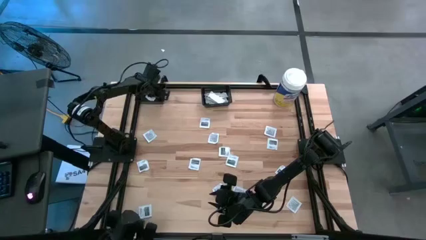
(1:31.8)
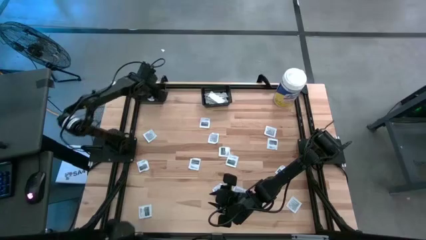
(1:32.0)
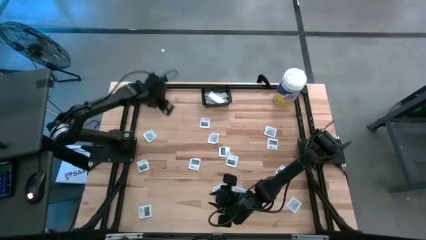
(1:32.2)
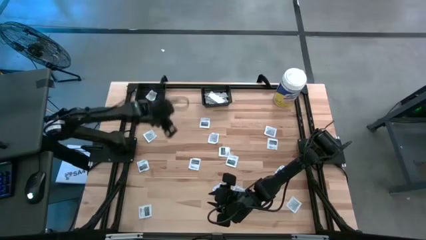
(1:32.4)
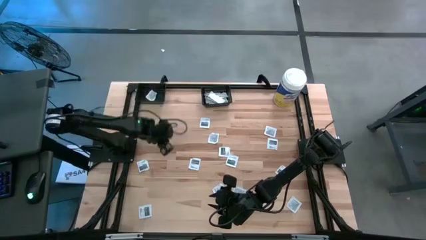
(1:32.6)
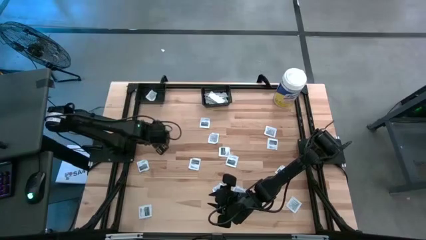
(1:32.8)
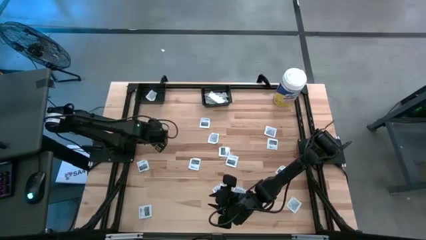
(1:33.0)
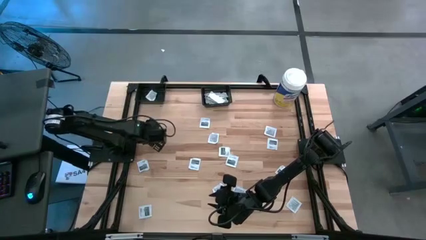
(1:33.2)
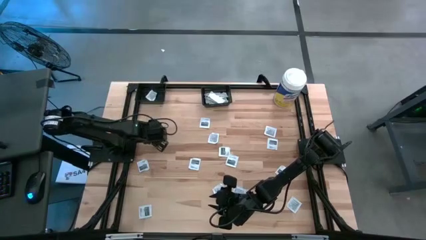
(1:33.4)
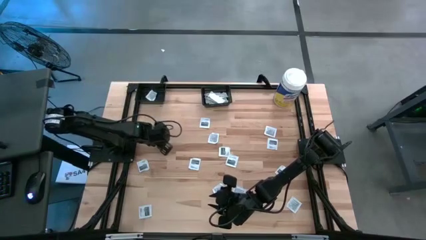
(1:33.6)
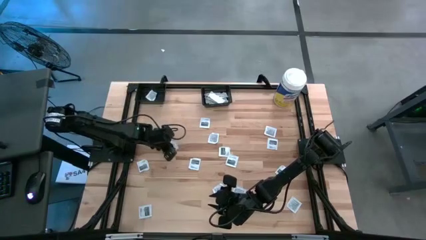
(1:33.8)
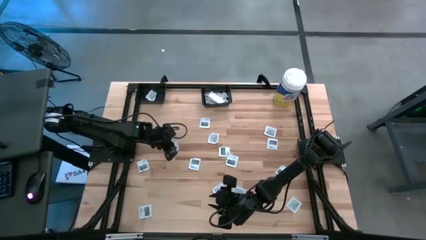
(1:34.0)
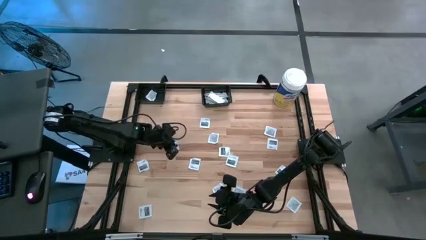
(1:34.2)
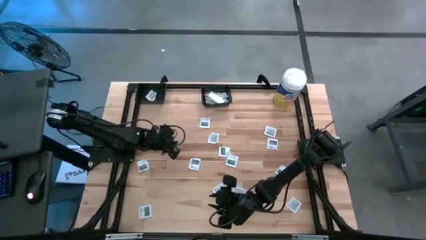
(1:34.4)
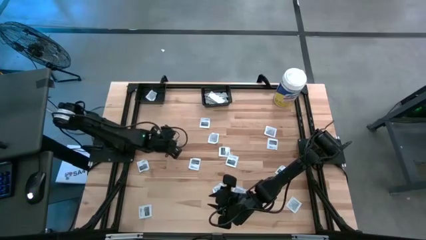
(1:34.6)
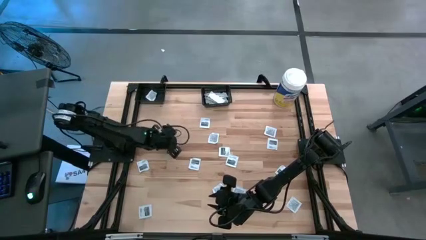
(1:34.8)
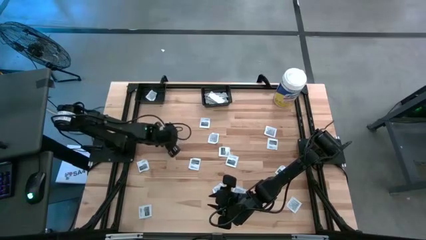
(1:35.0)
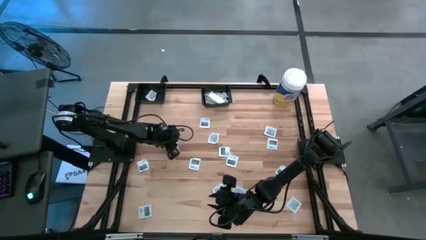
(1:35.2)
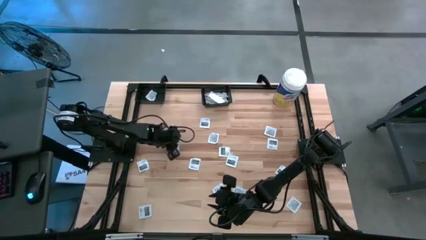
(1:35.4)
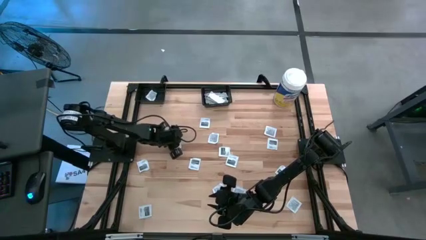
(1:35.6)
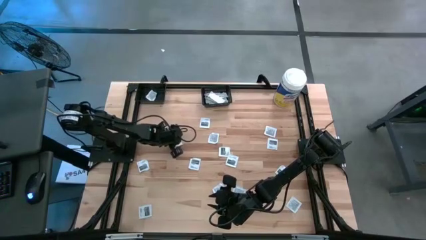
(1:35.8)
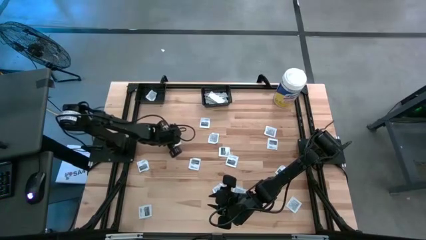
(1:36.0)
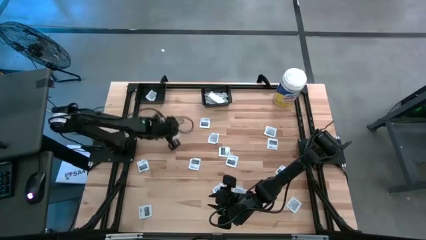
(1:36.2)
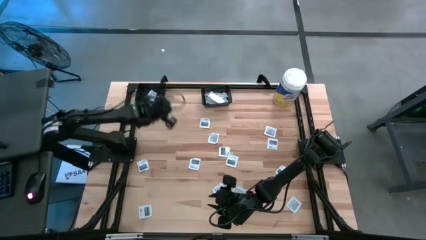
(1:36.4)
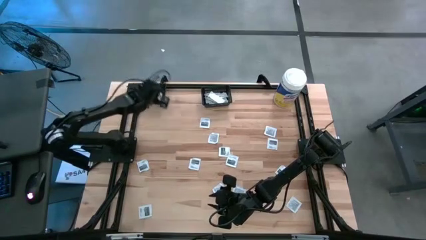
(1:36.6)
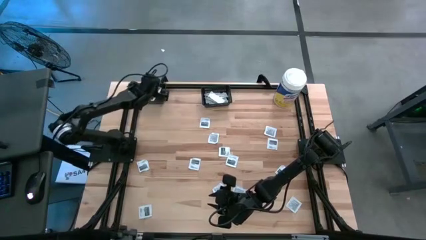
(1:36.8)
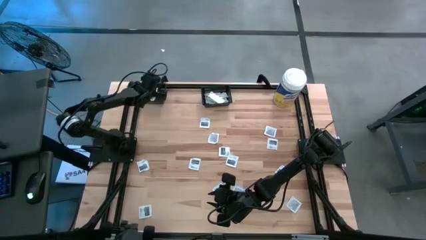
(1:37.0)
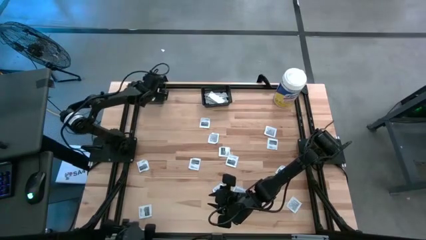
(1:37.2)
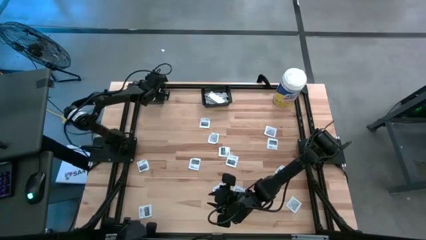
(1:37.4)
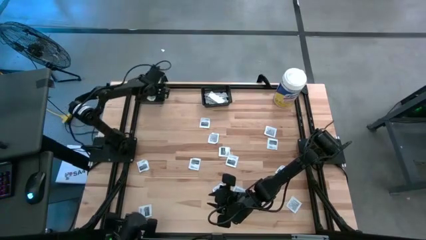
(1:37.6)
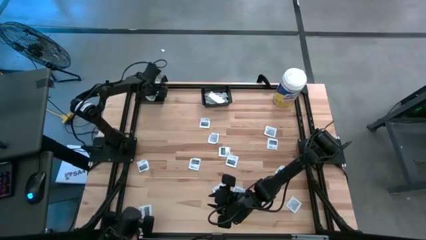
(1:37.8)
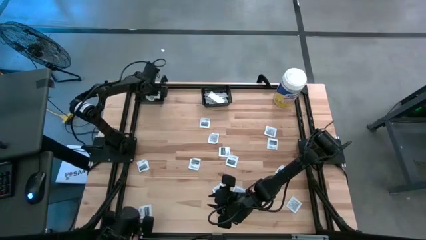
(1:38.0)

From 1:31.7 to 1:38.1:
Task: Pick & Place First Aid Supplies
Put the gray towelette pack into the left black bin

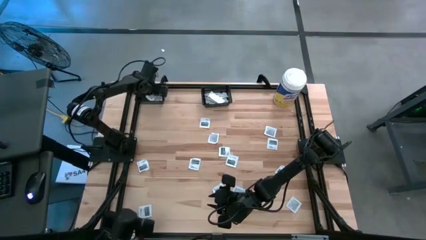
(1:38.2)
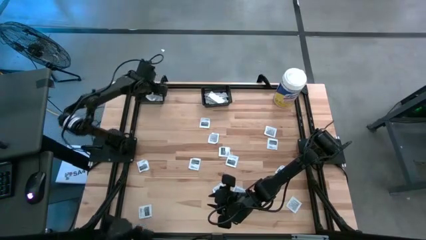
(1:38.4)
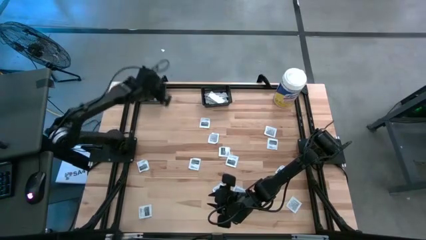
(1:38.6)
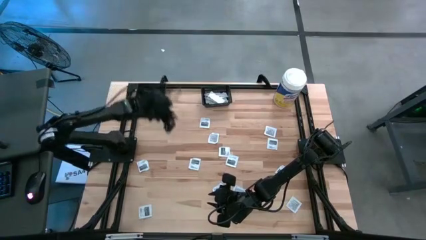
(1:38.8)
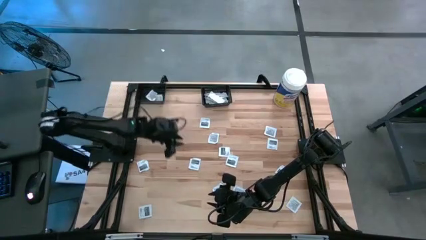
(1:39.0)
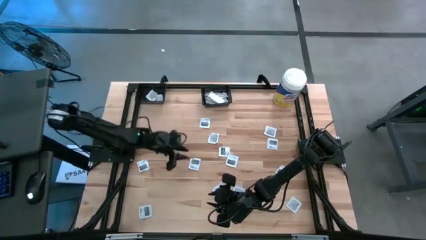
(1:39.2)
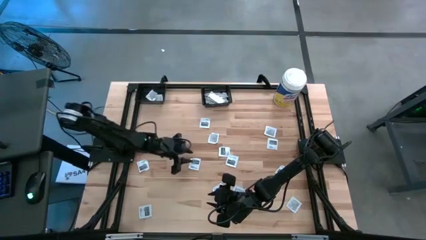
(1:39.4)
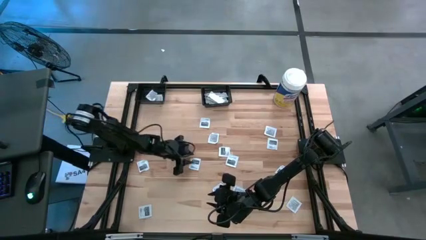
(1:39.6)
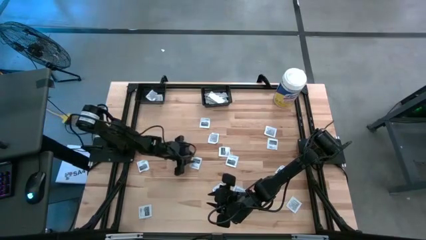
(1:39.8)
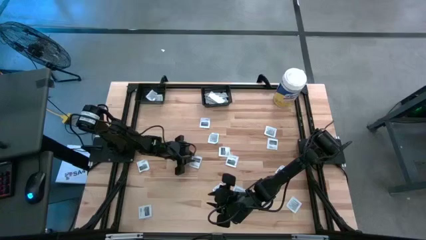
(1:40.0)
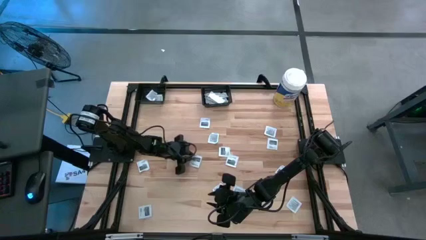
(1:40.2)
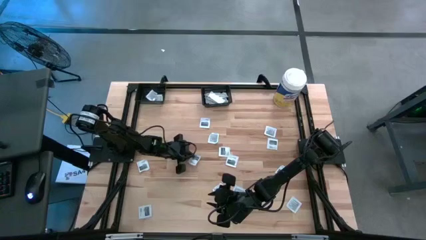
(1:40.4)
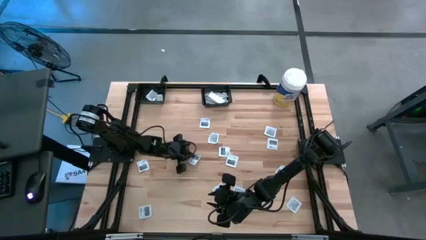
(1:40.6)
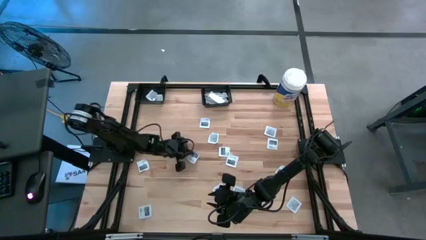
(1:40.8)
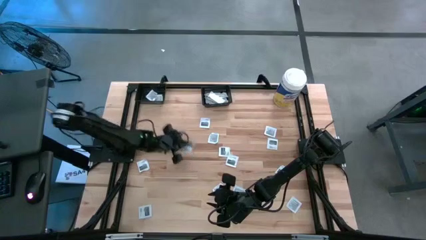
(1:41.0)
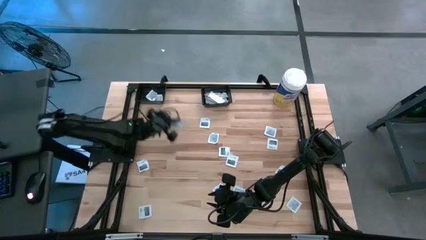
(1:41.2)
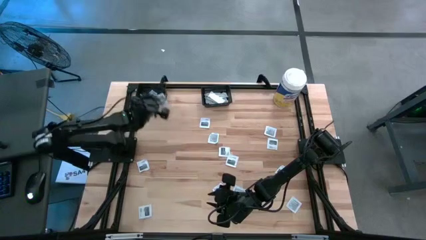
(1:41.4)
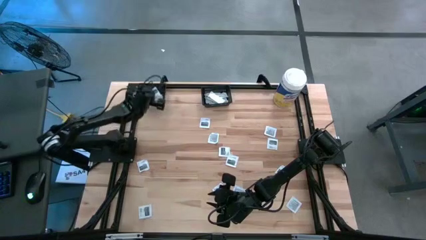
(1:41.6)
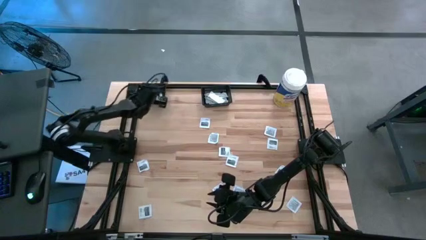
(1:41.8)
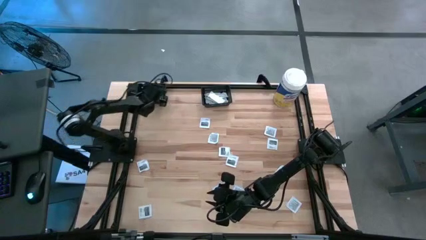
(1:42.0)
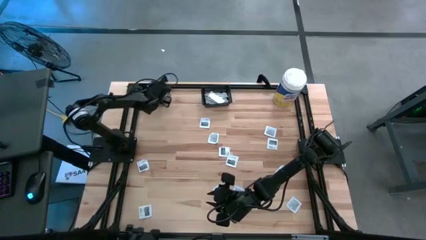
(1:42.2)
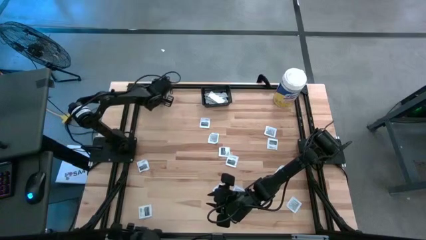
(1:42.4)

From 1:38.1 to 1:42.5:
Put the gray towelette pack into the left black bin

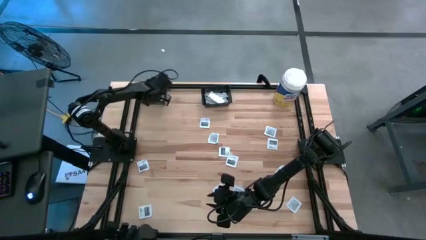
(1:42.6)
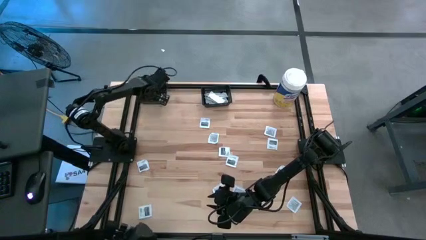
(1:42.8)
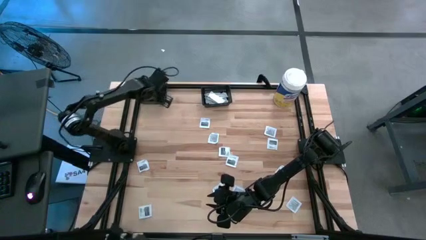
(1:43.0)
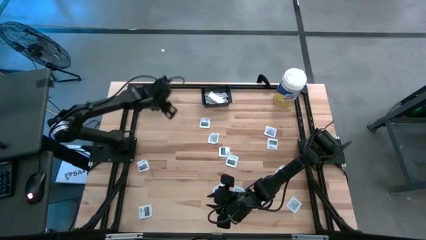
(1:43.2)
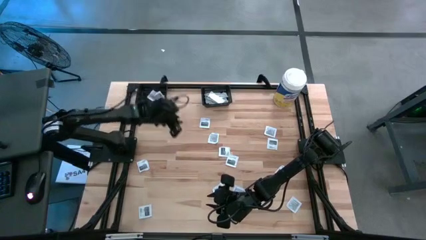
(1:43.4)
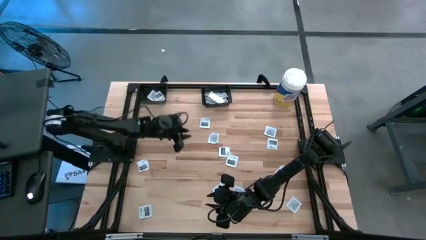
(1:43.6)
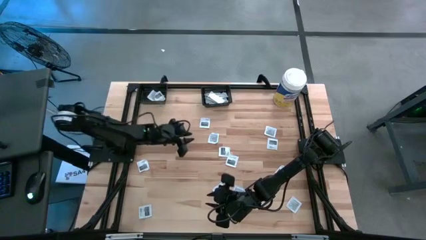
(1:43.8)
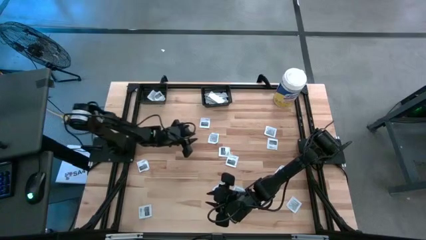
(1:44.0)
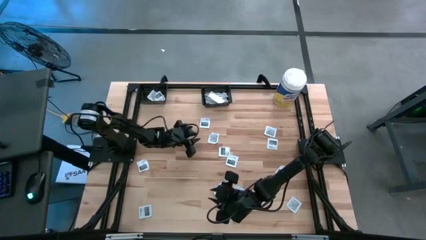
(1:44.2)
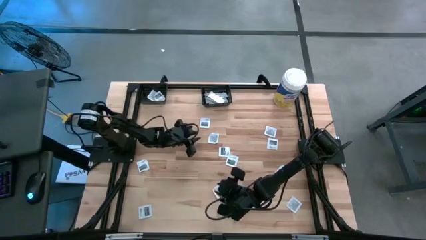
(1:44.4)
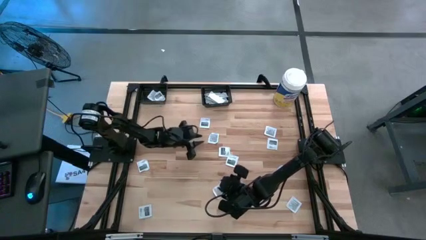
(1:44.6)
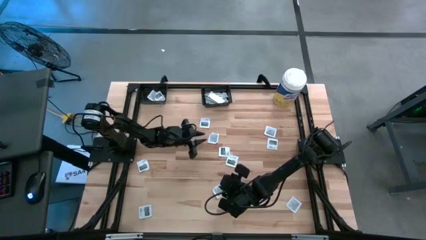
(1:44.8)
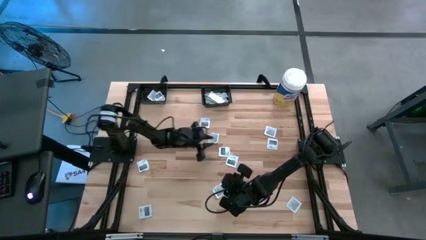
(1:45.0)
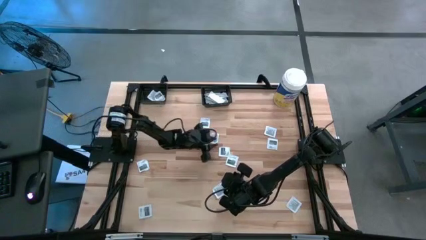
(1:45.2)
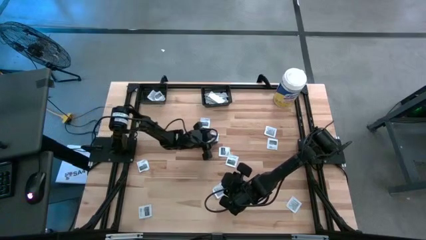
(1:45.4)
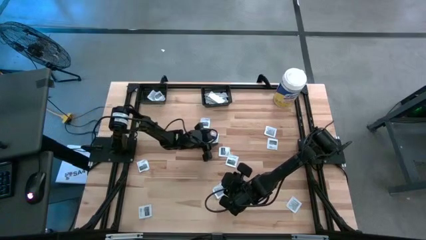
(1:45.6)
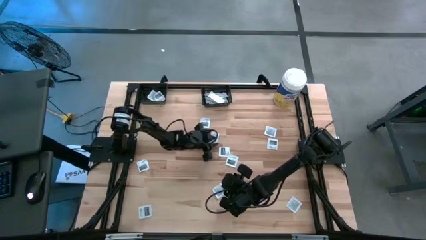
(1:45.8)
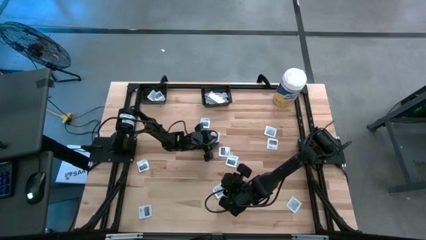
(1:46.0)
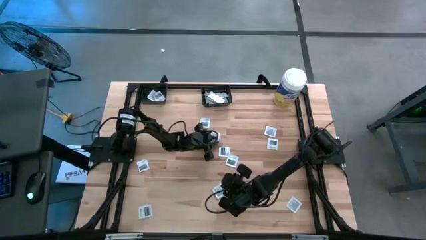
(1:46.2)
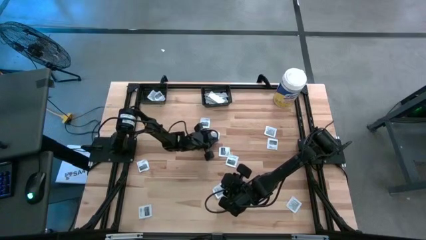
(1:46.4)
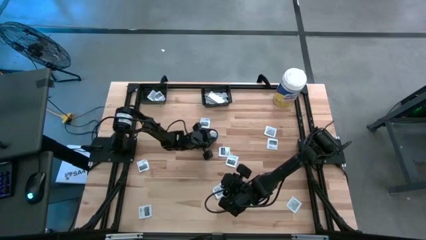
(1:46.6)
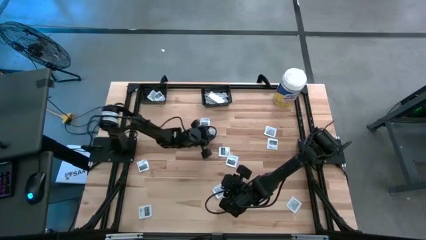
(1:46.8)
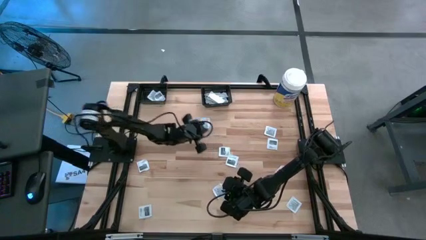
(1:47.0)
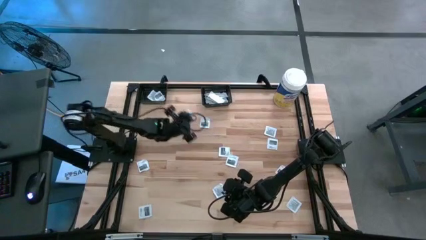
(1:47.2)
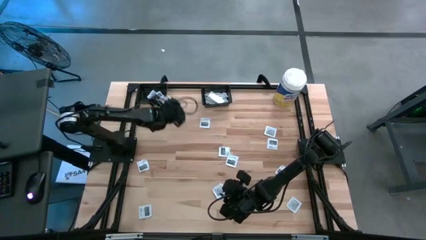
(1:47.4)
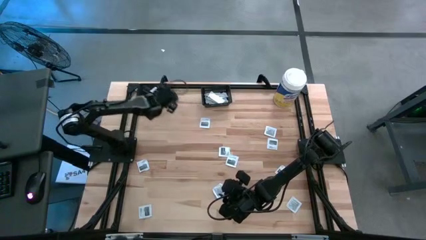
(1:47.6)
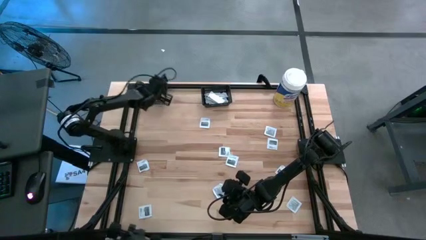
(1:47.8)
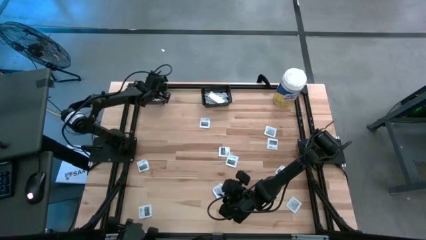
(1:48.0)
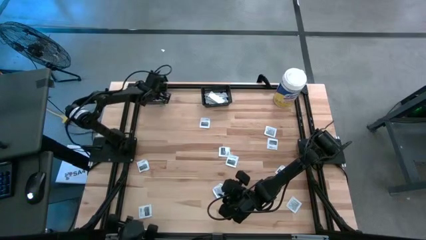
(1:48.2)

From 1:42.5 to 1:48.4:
Put the gray towelette pack into the left black bin

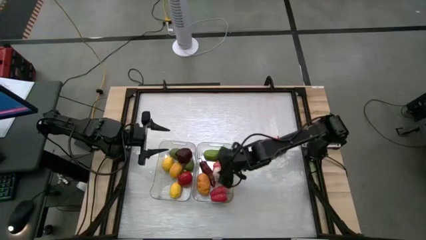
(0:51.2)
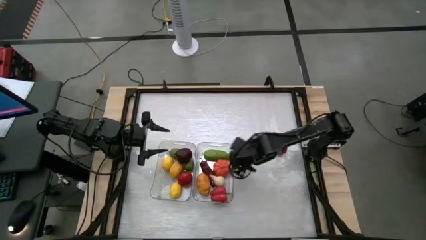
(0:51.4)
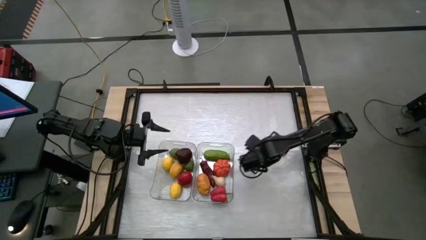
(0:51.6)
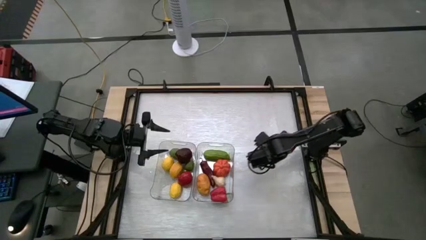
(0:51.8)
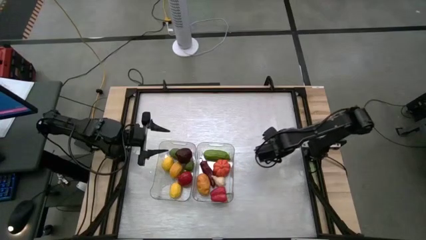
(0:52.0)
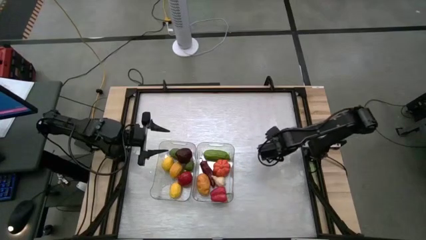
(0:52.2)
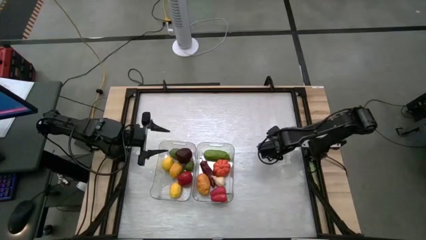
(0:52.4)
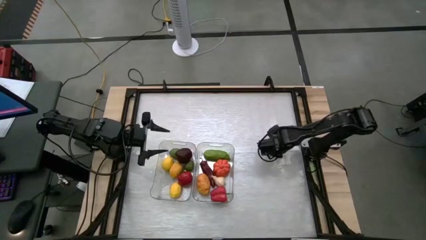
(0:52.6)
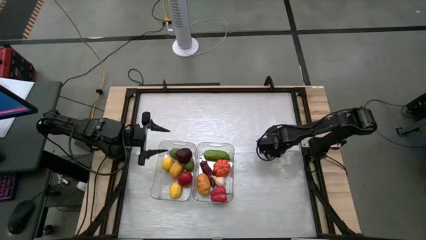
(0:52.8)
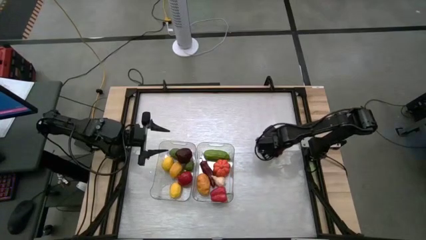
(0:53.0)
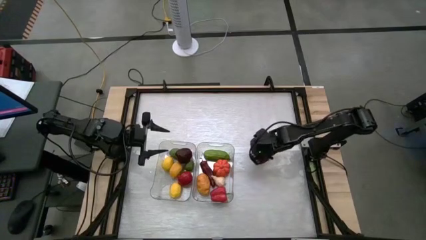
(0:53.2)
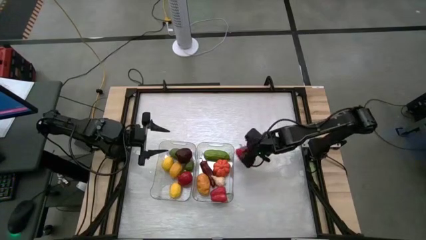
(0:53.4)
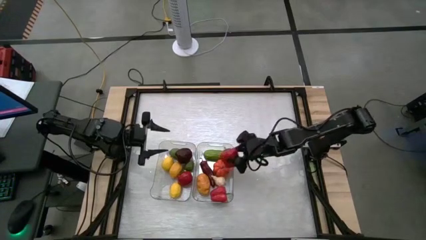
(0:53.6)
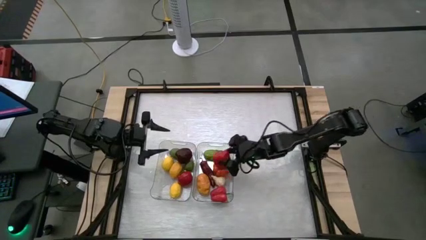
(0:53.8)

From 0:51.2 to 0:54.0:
Task: Sort produce into baskets
Put the red bell pepper into the right transparent bin
